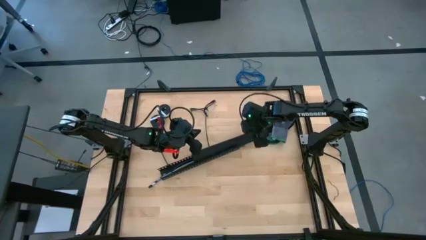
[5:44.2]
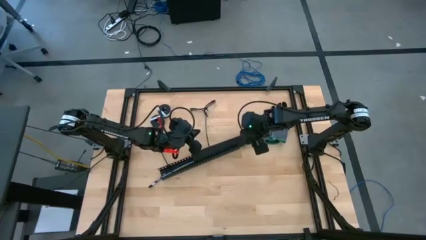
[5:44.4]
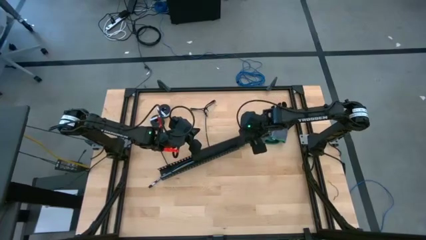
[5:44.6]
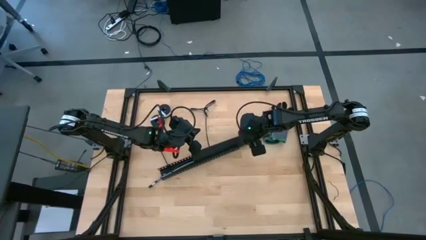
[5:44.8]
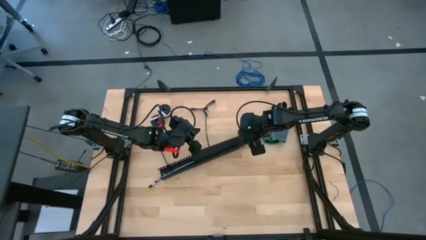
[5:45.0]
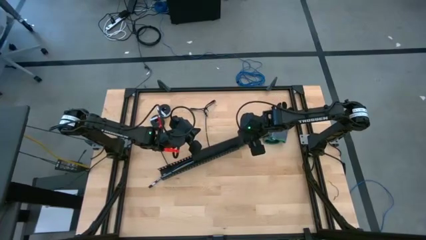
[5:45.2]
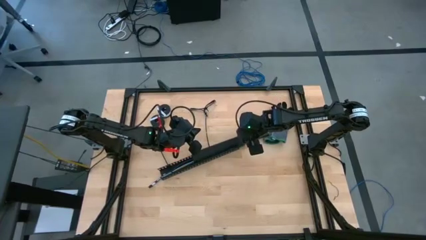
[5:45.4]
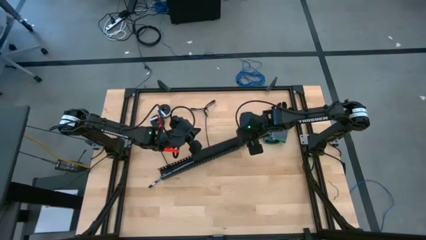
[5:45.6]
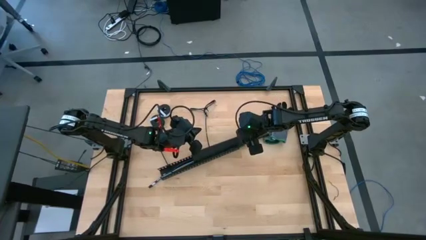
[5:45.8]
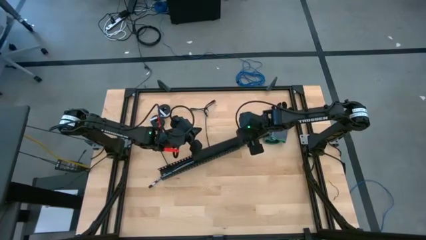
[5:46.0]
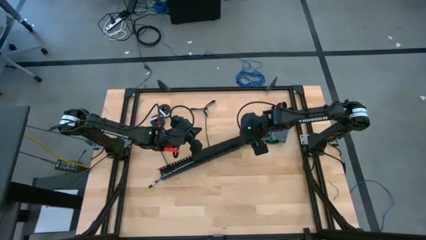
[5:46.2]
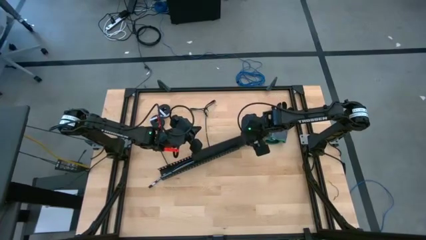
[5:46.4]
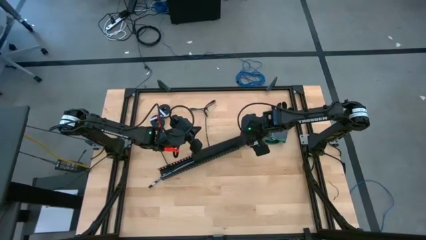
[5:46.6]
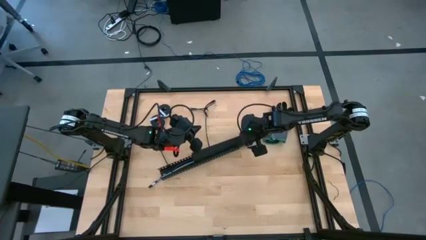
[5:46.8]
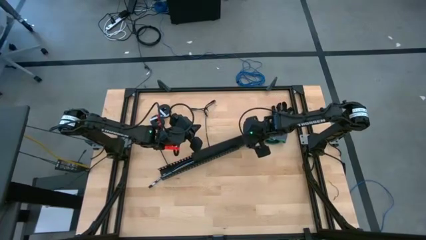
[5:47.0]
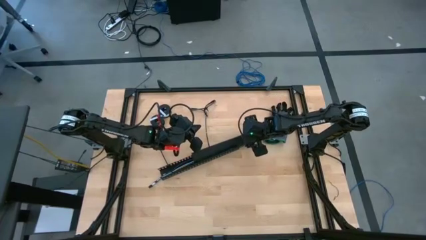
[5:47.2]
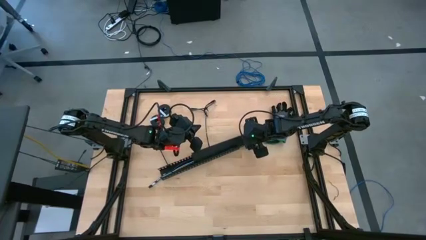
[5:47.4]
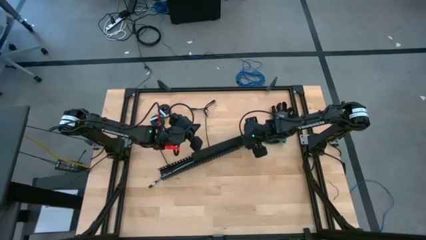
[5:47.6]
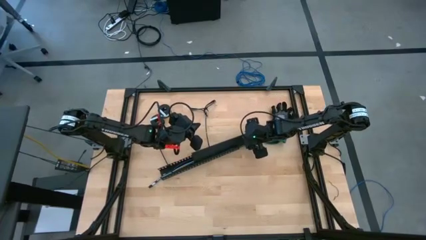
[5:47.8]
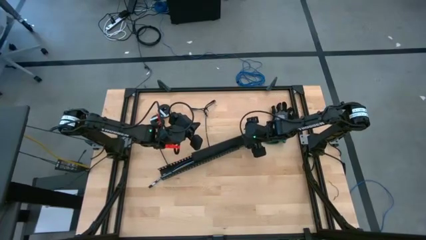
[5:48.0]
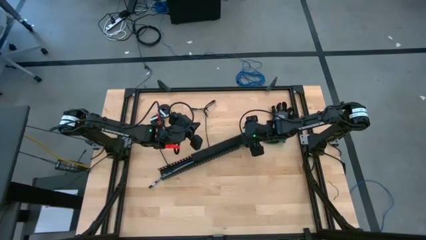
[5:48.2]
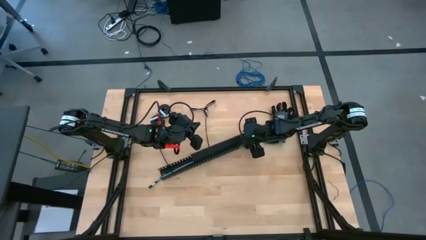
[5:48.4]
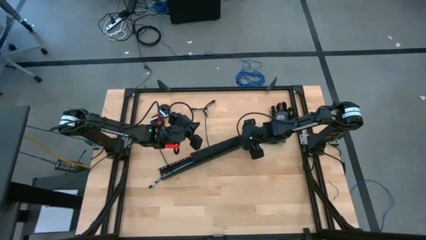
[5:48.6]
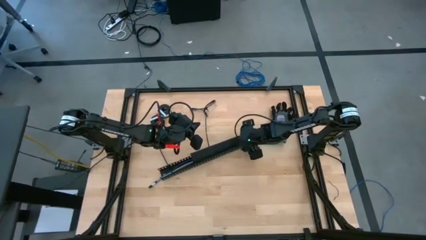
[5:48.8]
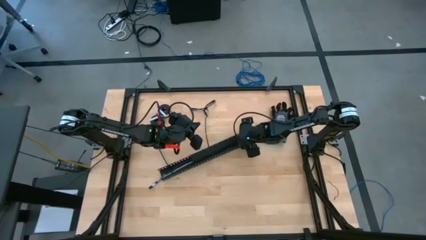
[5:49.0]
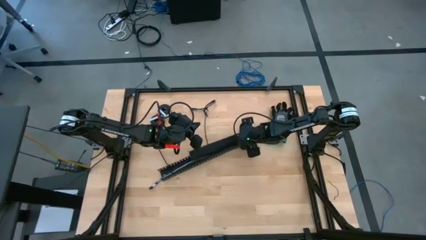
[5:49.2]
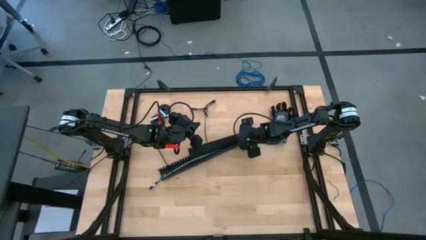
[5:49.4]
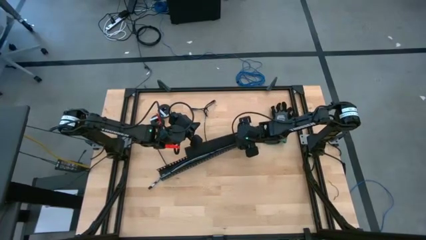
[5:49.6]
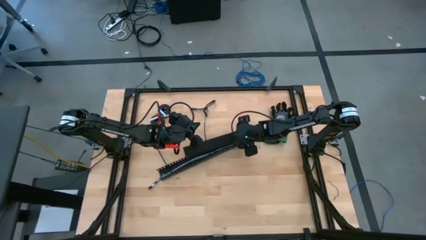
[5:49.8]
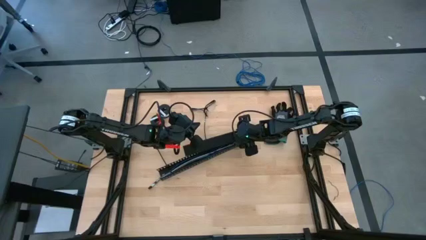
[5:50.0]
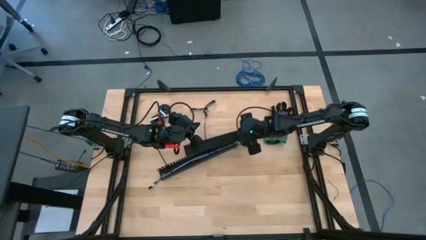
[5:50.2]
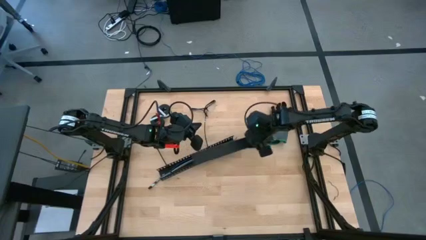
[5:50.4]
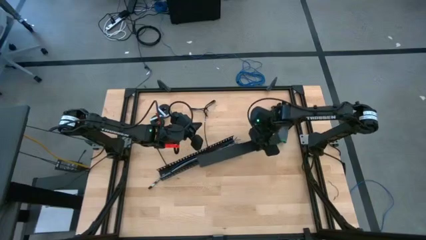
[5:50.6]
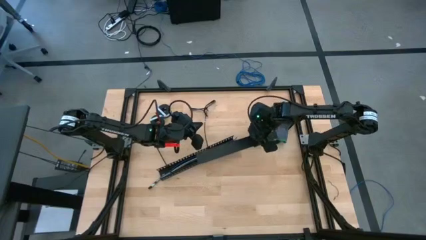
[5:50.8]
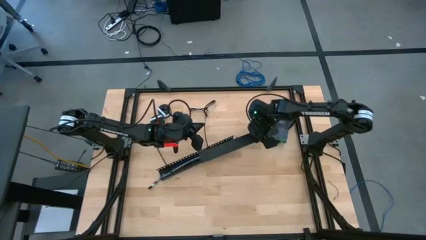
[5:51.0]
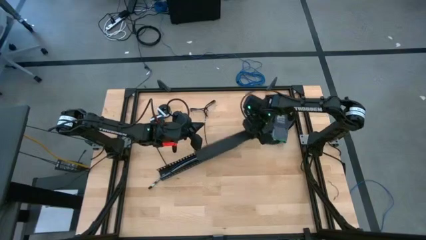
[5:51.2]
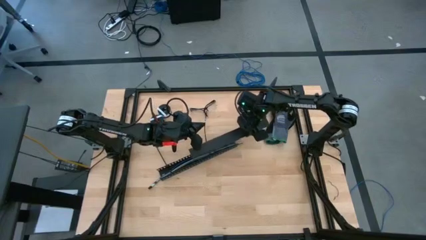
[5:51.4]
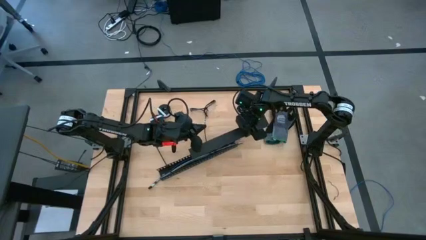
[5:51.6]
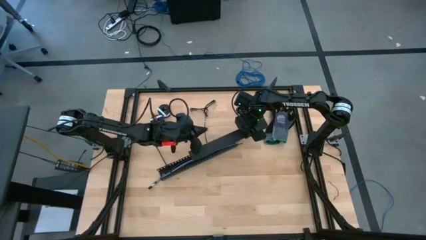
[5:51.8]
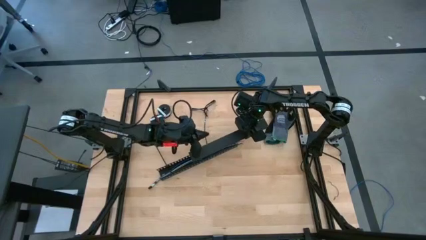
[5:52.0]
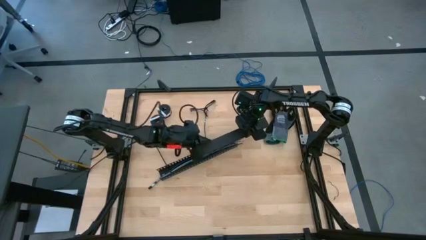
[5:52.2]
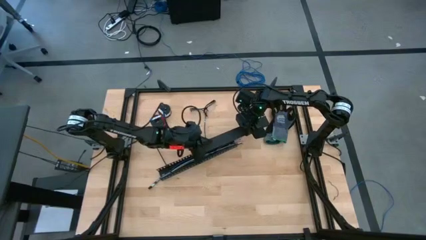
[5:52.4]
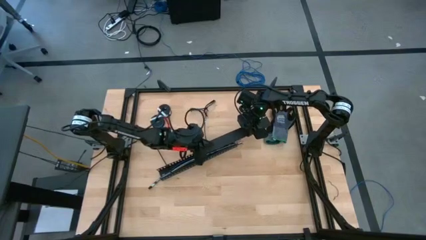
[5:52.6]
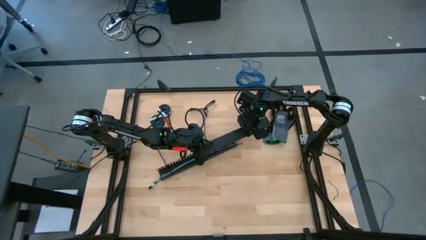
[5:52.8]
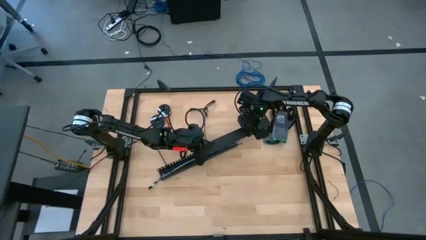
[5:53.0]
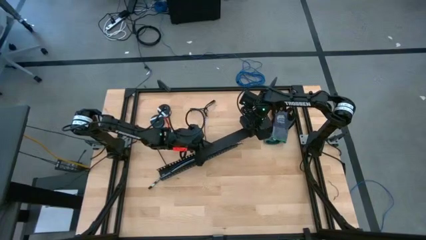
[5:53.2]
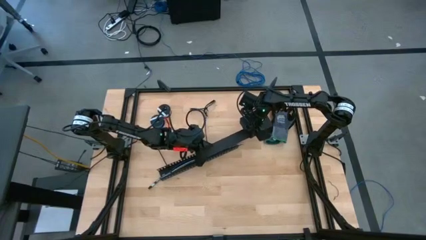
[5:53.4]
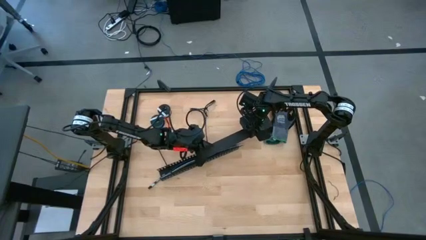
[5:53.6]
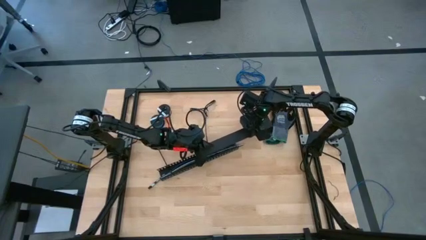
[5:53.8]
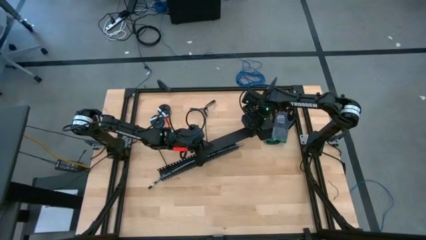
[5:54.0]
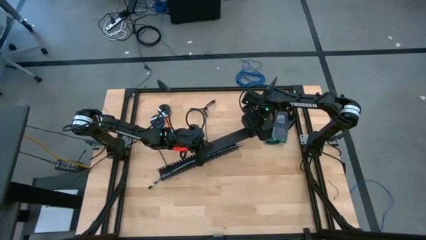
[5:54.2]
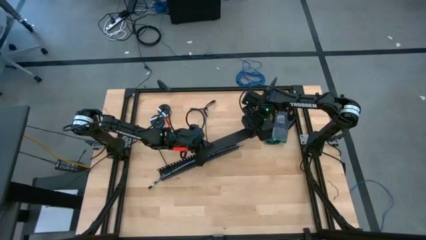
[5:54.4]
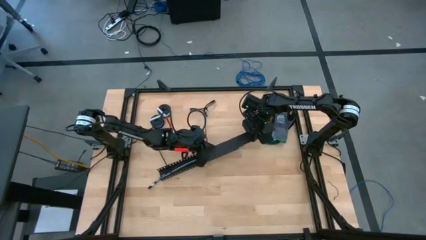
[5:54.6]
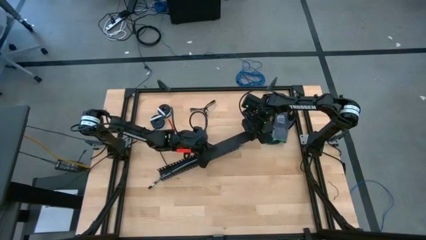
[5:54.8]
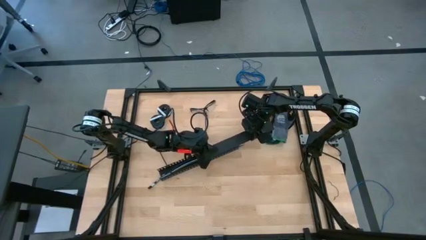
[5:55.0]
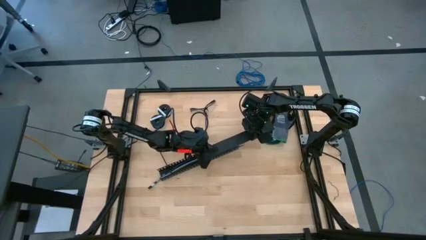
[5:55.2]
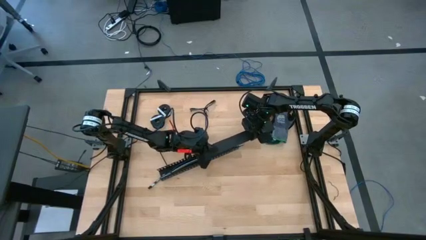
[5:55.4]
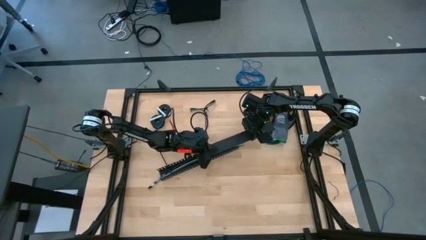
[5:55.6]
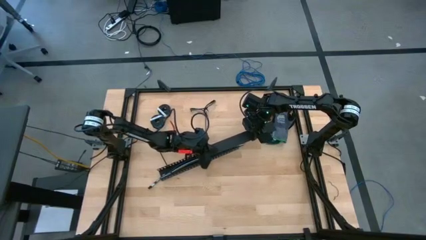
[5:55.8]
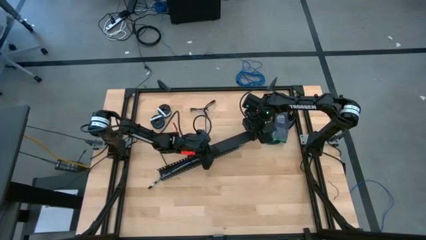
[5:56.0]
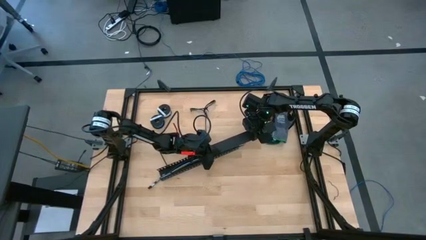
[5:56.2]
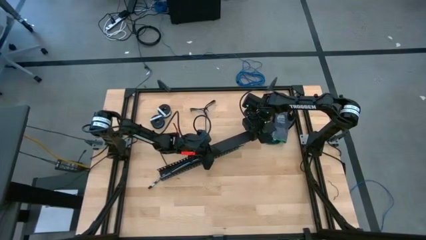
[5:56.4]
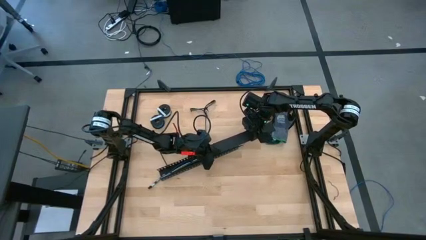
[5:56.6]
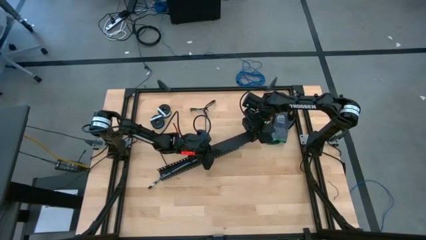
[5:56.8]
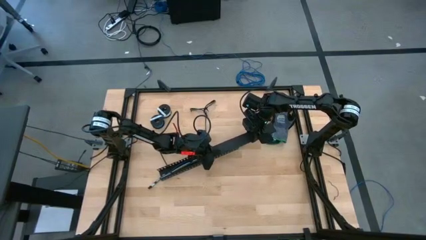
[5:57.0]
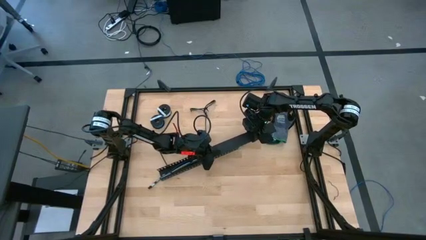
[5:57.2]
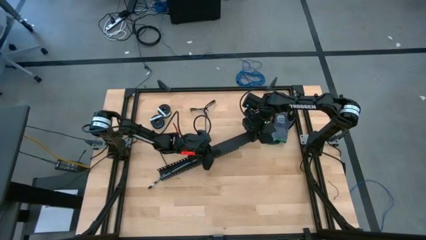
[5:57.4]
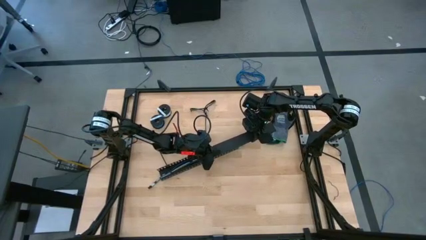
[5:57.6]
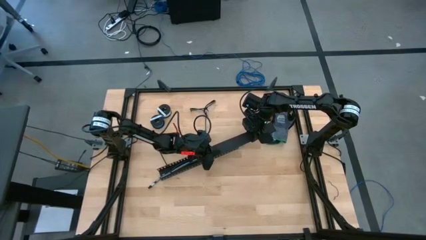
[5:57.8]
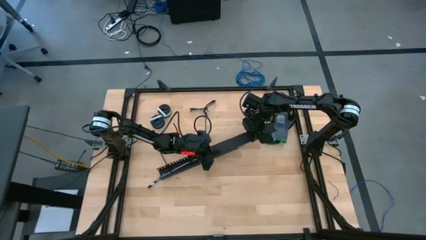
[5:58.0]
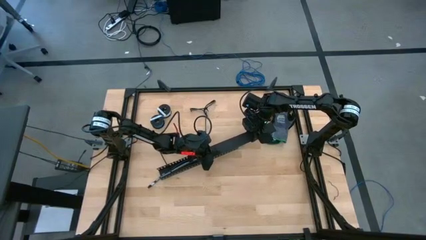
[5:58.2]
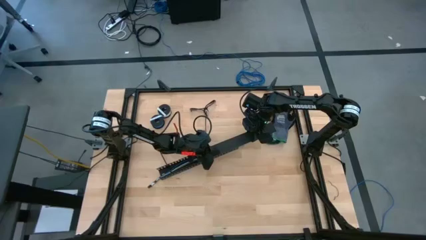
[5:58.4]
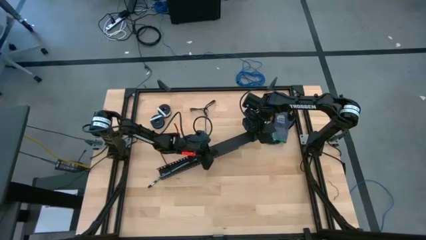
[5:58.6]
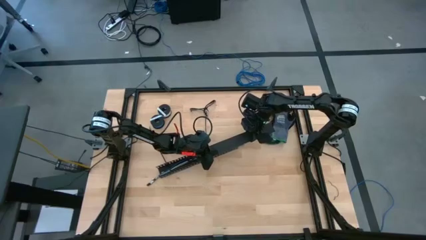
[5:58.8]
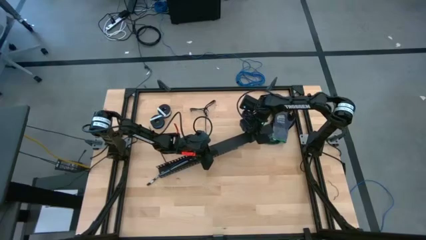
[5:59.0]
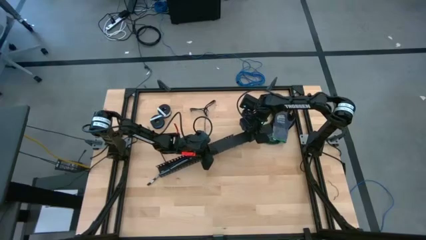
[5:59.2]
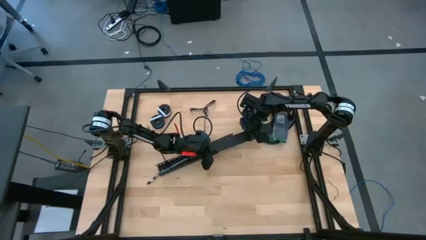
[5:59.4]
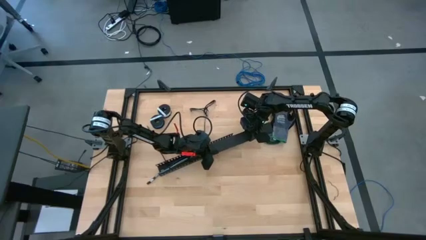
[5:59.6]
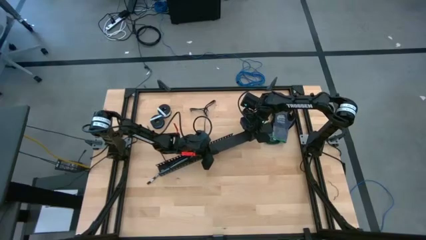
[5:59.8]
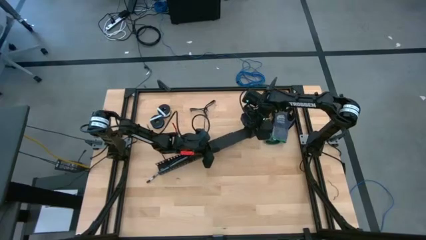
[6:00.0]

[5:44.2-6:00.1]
Task: Ziptie cables
Insert the black cover of the black cable duct

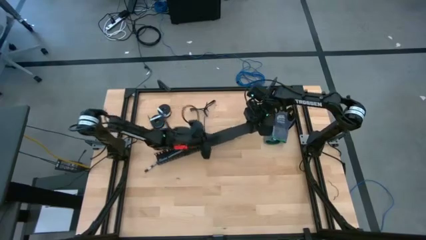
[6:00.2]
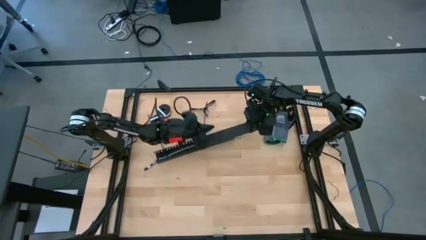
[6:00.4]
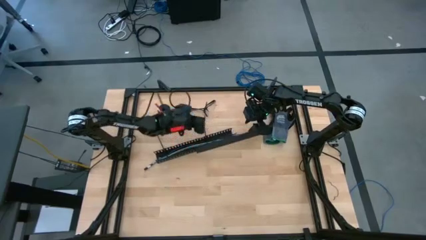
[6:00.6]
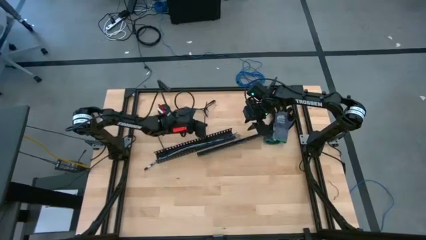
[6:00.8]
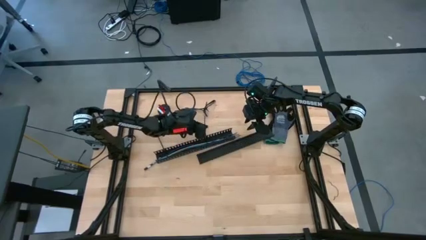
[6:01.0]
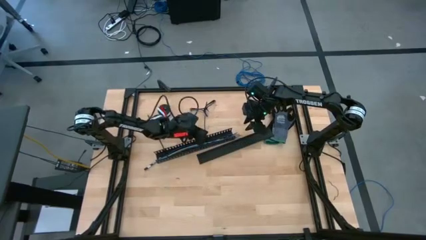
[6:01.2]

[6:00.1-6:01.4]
Insert the black cover of the black cable duct
